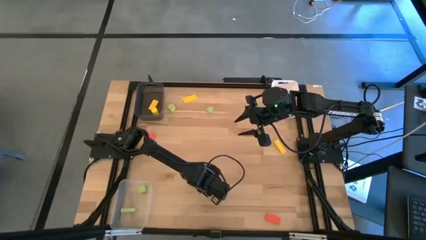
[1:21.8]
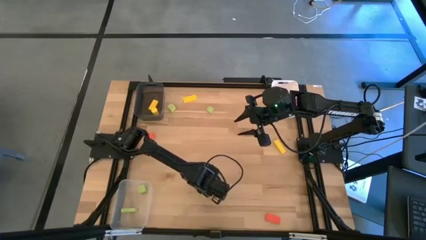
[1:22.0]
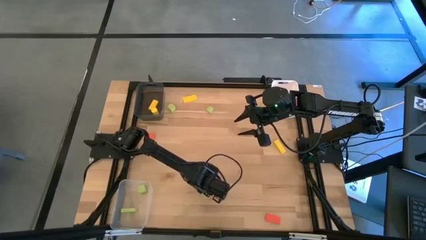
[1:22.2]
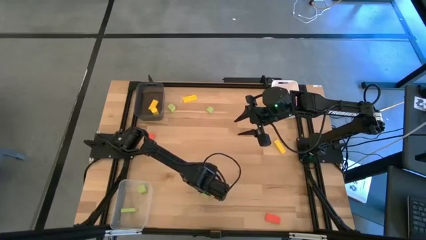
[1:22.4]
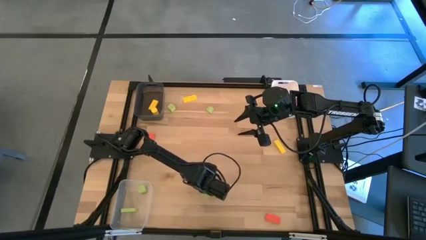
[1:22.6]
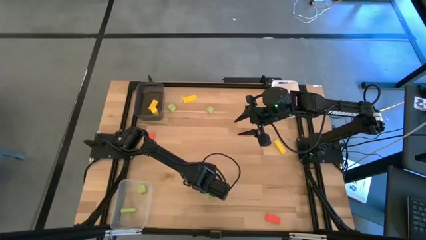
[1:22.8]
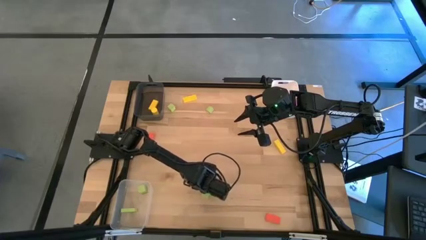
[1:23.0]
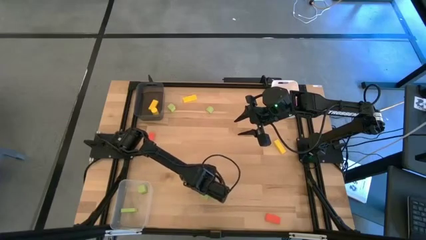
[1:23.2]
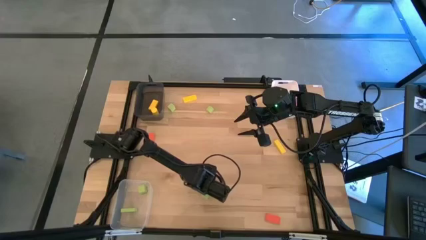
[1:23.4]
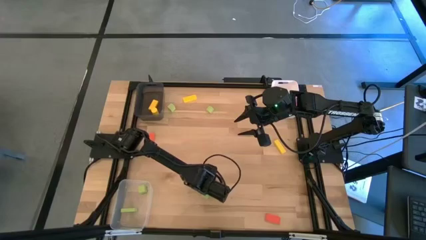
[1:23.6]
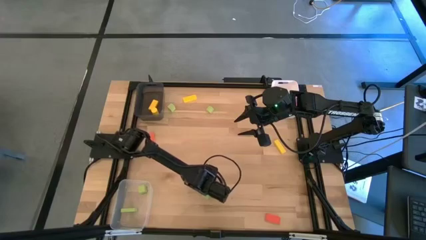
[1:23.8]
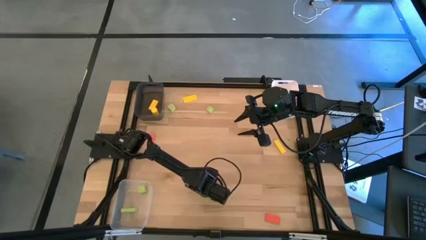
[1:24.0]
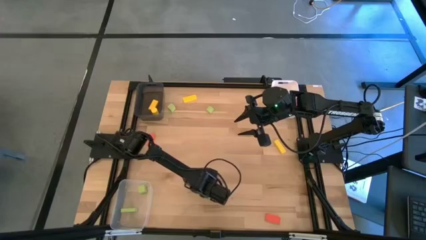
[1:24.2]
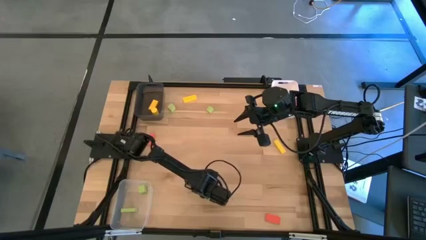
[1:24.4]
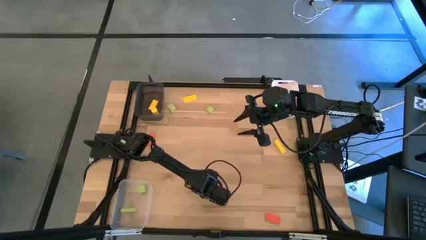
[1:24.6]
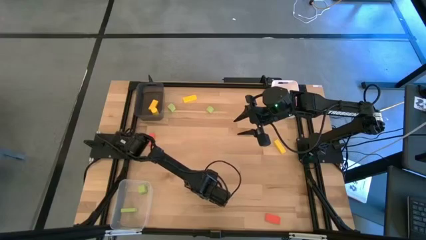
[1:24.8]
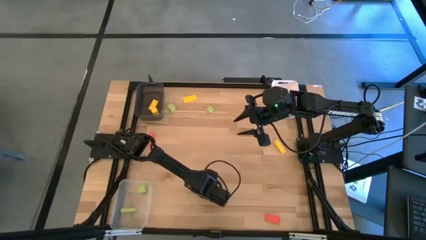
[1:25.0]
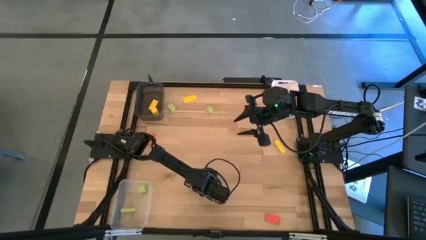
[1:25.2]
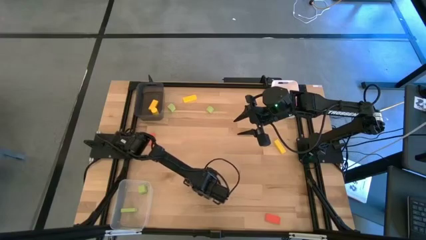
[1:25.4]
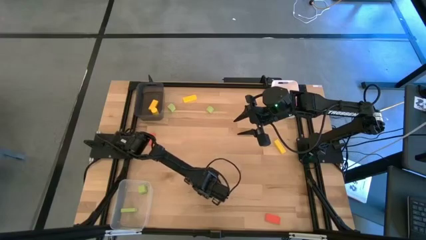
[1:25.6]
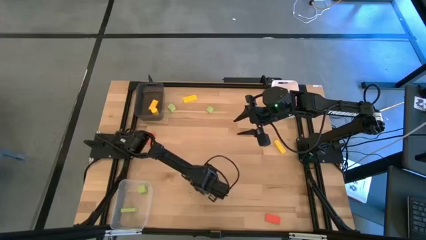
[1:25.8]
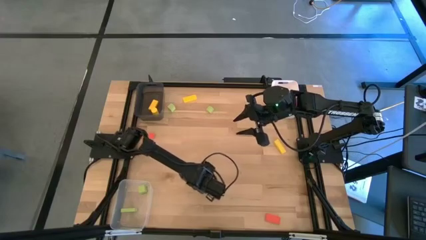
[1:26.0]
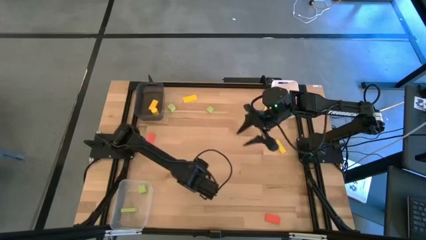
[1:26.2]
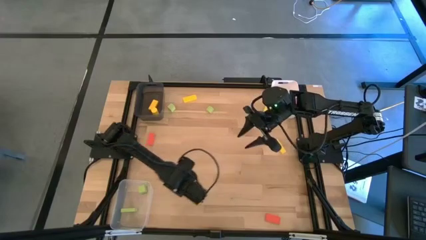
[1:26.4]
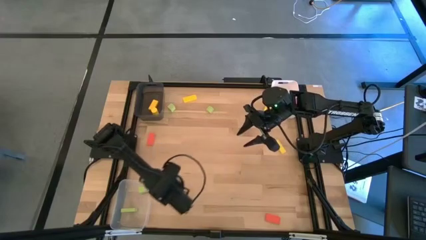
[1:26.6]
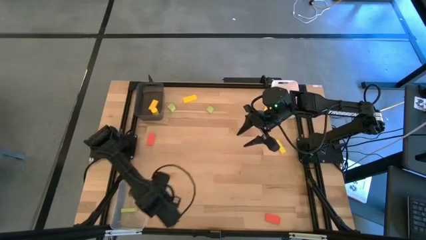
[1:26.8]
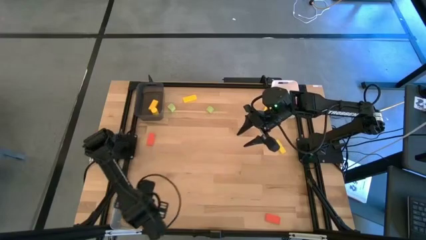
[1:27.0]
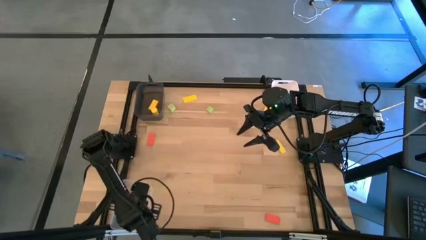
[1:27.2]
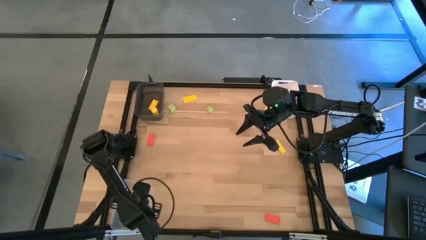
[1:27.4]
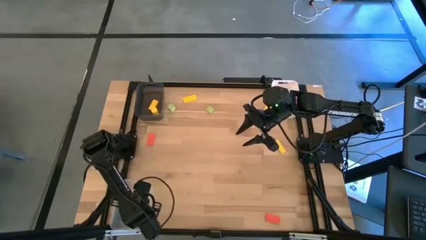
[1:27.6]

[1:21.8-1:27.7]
Task: Sort & place blocks by color
Put the green block into the transparent bin

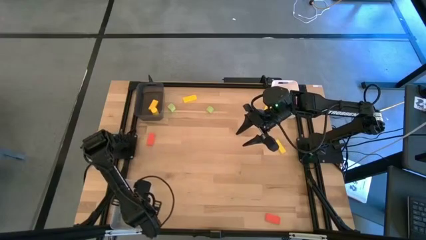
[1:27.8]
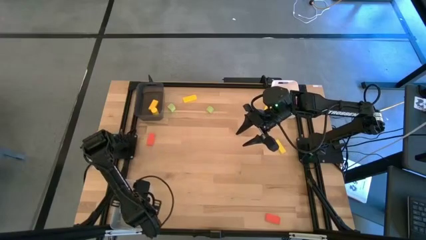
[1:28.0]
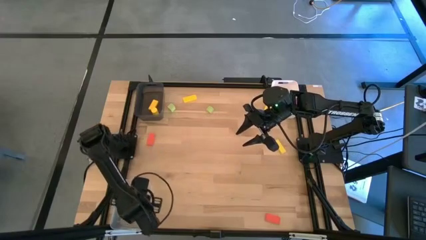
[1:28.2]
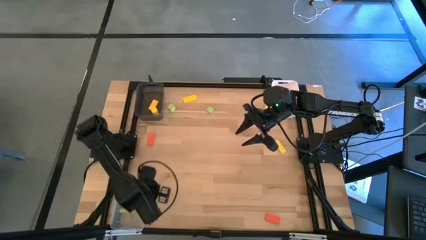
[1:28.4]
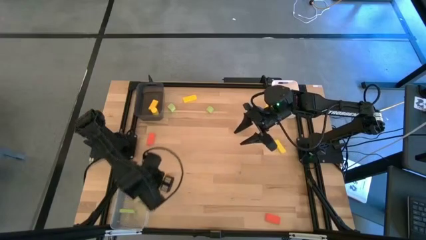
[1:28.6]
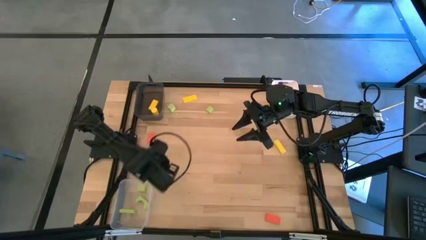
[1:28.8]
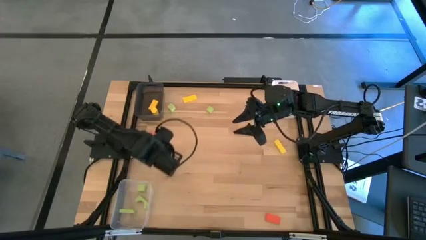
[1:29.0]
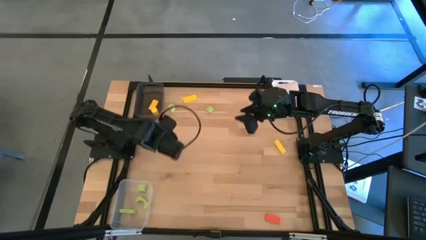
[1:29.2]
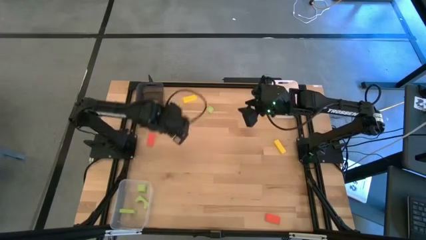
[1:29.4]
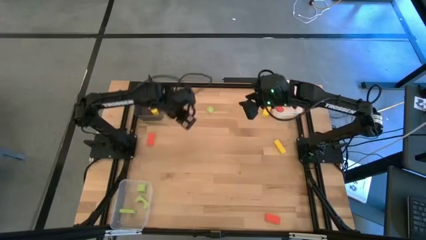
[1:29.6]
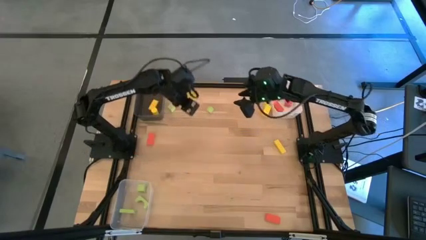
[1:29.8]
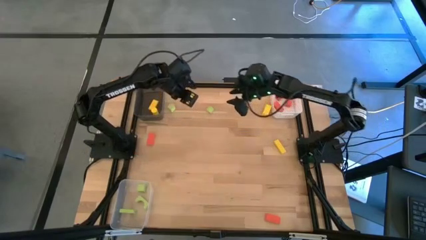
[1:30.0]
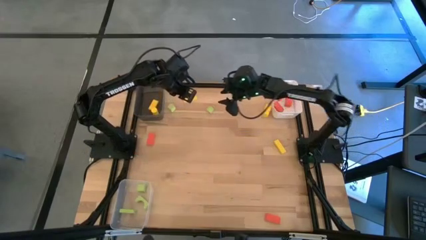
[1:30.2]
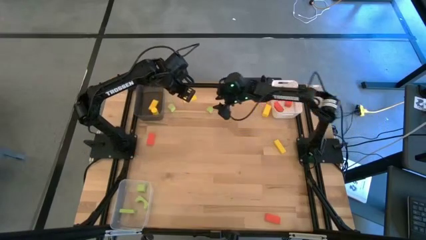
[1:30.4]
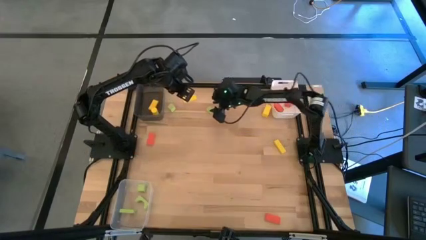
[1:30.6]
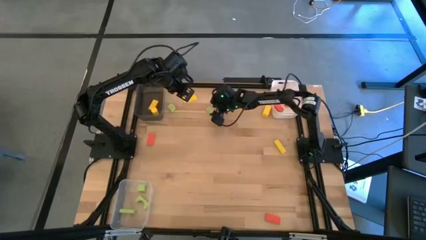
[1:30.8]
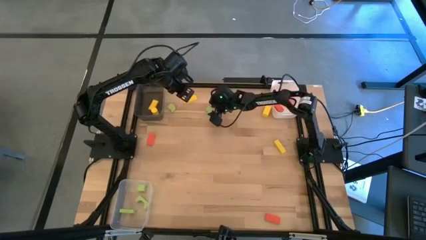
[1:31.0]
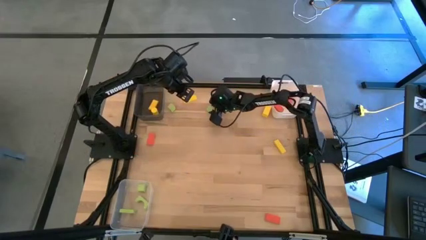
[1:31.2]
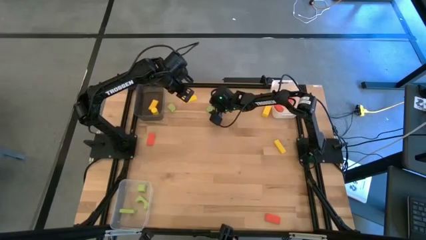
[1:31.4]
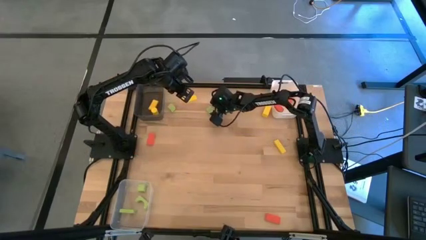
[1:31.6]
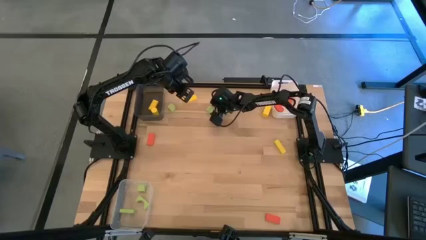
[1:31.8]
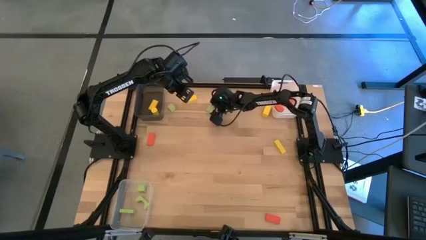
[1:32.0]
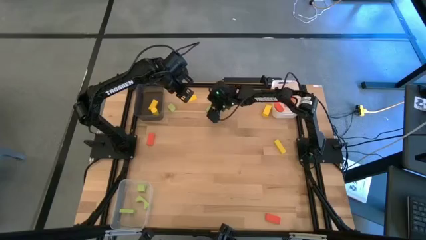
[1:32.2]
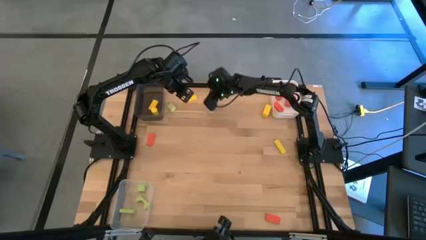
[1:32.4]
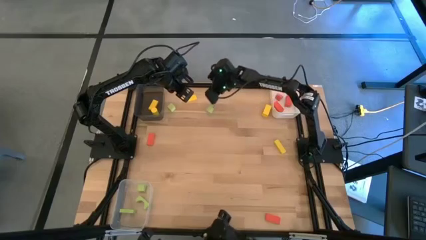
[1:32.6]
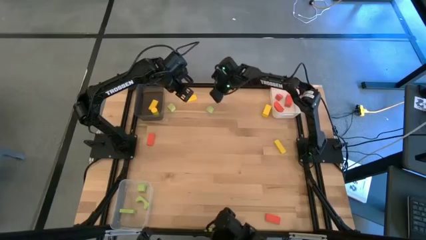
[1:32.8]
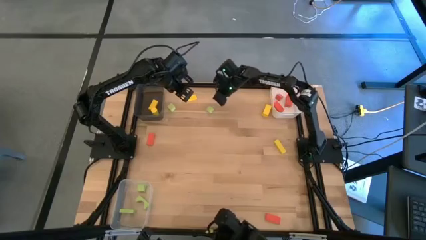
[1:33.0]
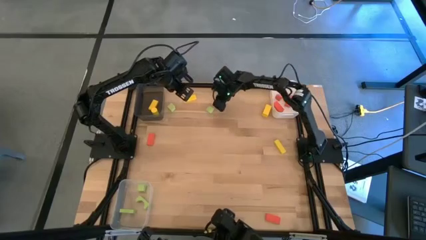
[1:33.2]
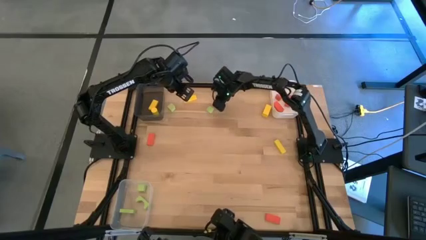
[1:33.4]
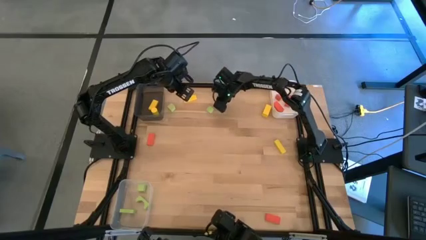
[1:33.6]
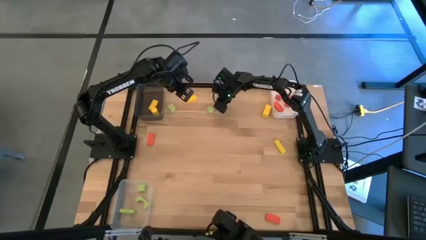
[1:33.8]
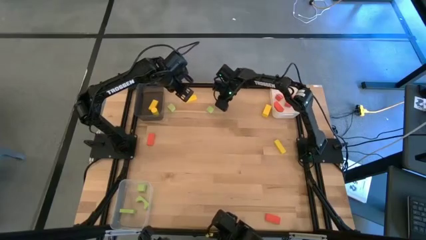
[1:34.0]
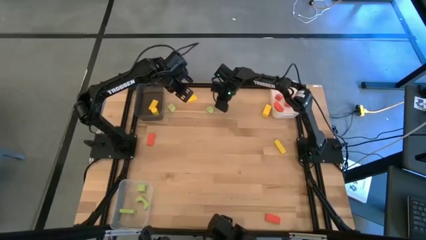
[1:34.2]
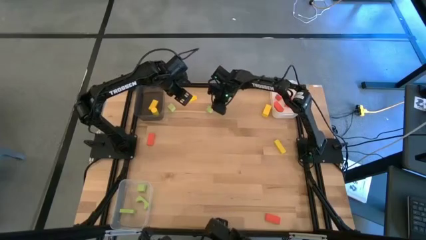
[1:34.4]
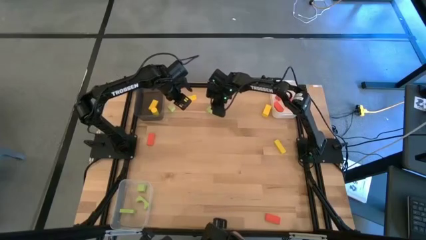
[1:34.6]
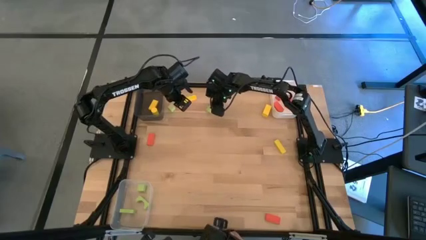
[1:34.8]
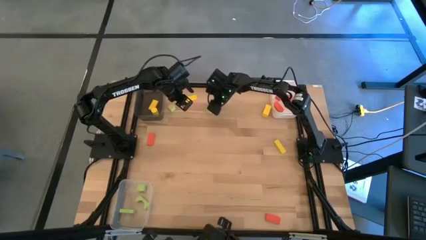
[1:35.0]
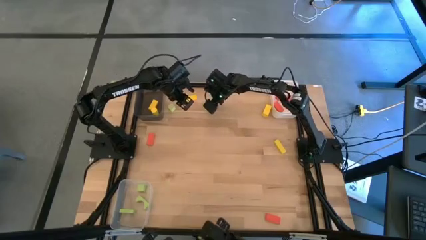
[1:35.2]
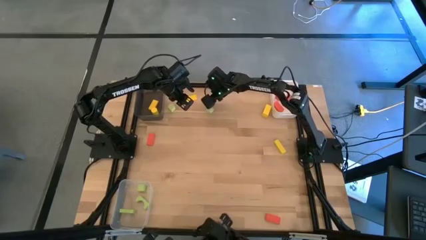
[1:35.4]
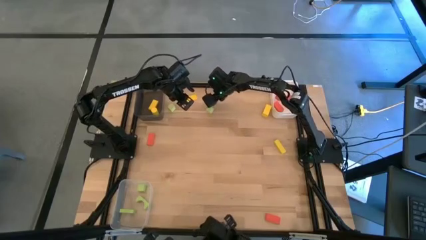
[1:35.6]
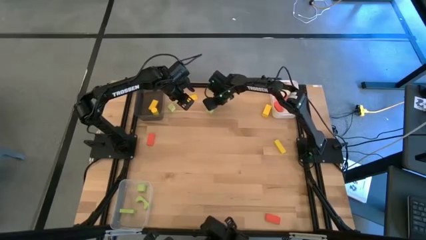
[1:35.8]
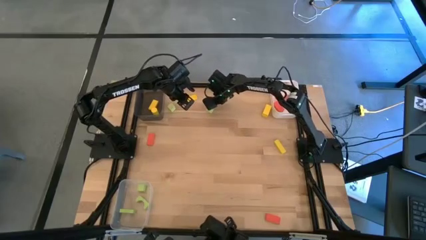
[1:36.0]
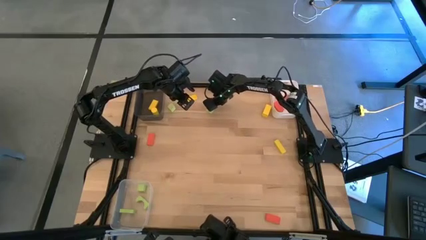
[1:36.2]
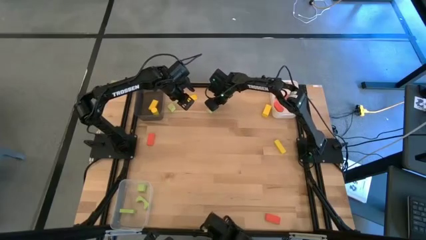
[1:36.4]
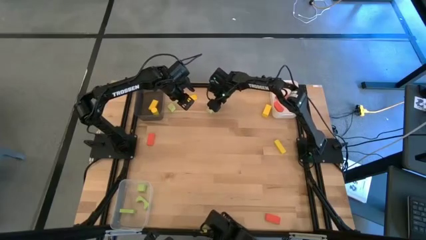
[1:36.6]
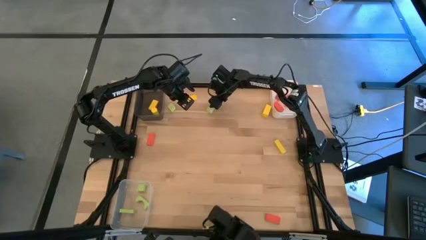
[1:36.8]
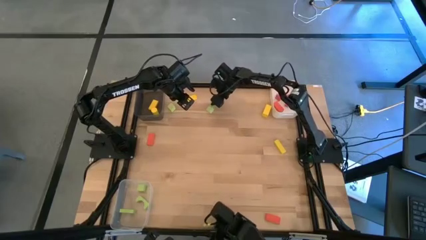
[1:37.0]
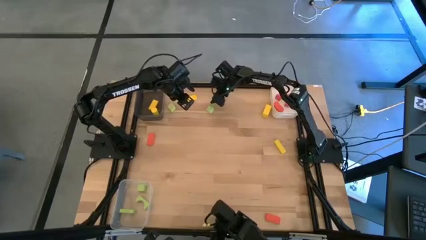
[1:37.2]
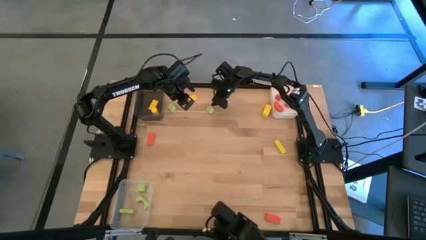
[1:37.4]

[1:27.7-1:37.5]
Put the green block into the transparent bin

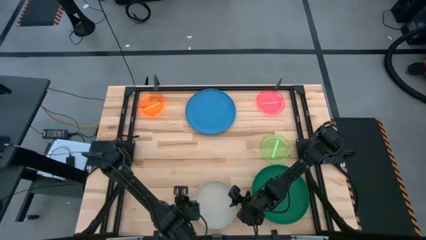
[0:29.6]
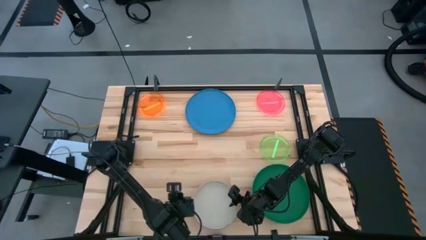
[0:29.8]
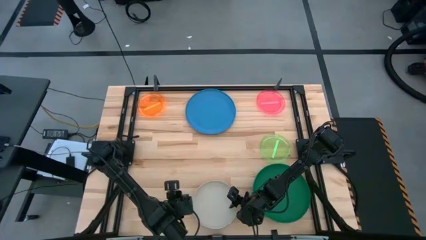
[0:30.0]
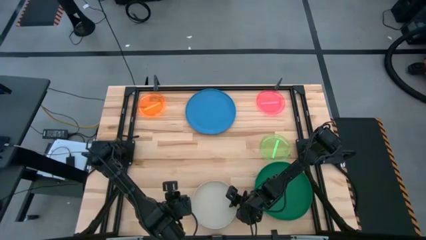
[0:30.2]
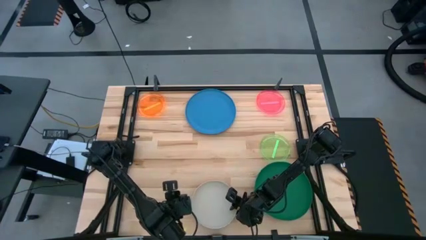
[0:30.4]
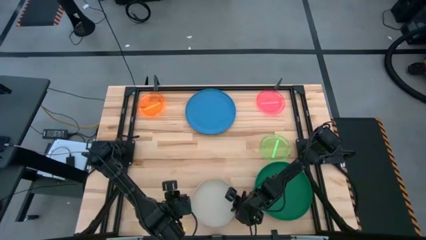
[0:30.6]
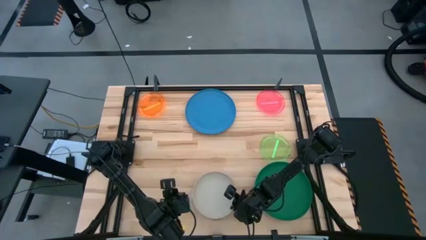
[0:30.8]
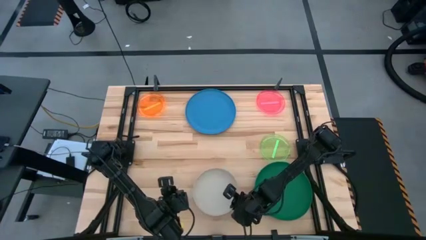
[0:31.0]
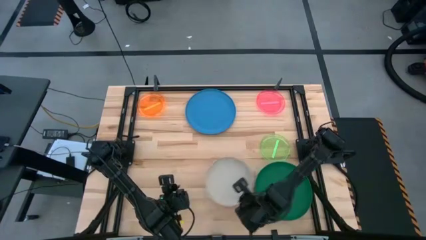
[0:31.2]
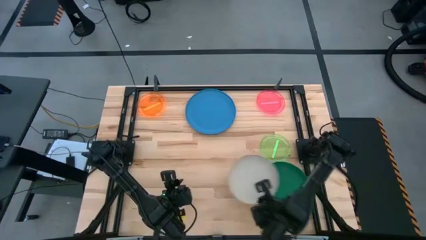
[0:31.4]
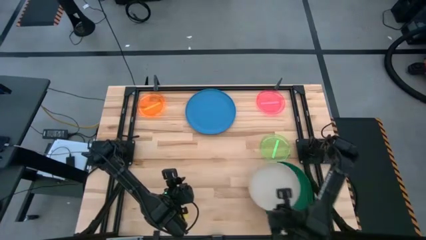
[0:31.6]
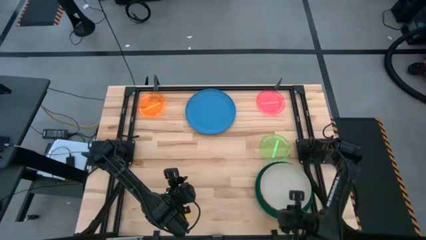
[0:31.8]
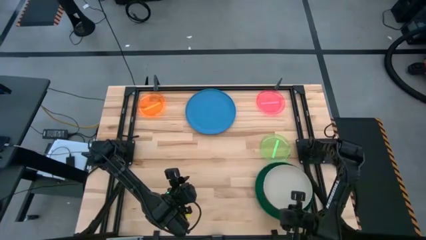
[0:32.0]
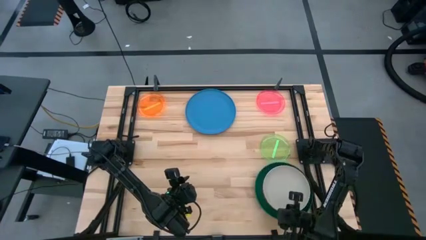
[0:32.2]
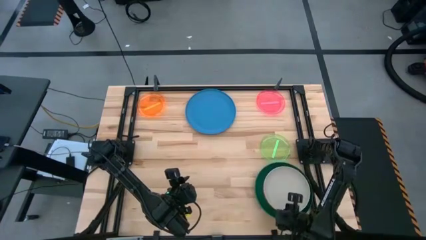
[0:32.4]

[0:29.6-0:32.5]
Task: Stack plastic plates
Stack the stacked plates on top of the dark green plate
